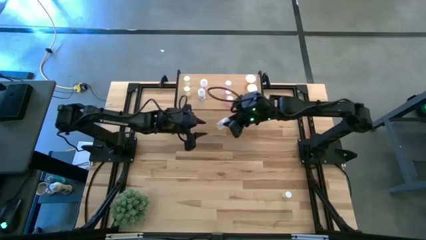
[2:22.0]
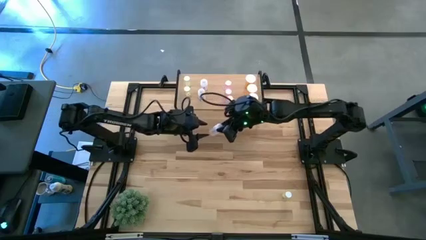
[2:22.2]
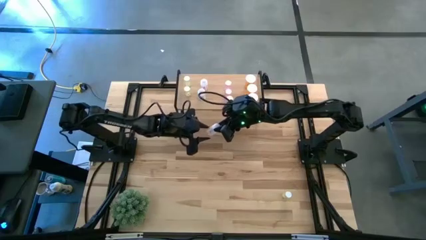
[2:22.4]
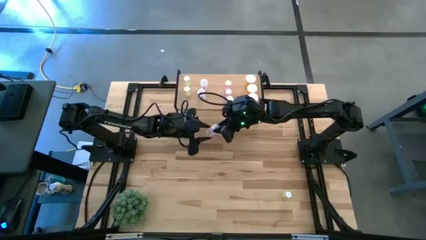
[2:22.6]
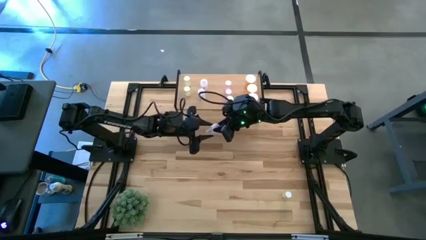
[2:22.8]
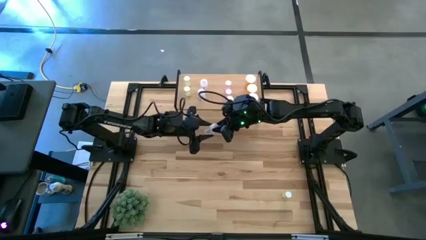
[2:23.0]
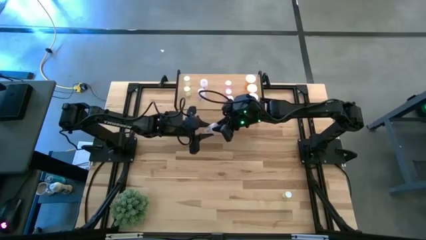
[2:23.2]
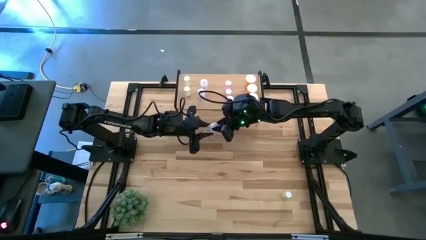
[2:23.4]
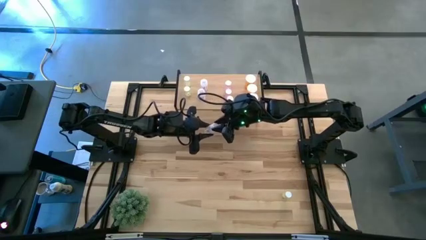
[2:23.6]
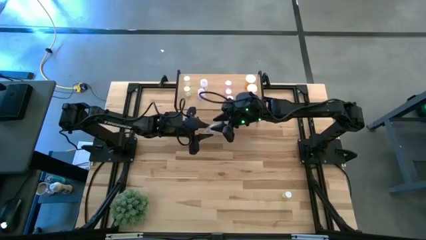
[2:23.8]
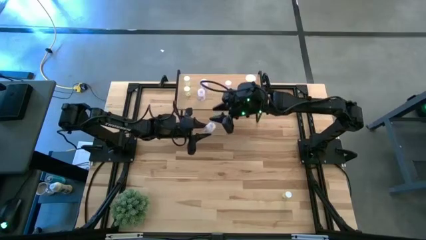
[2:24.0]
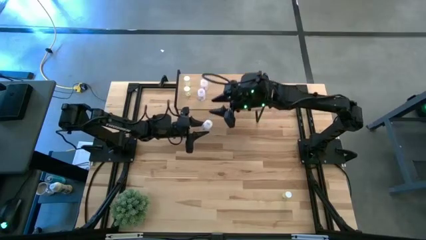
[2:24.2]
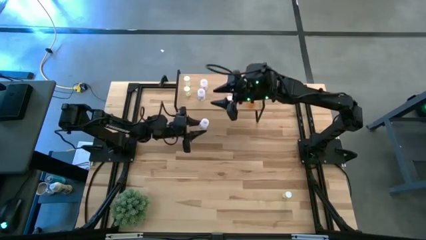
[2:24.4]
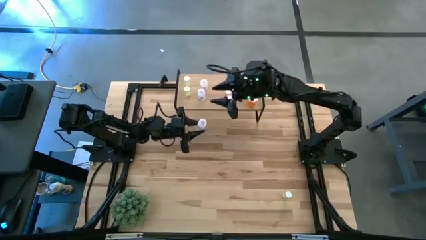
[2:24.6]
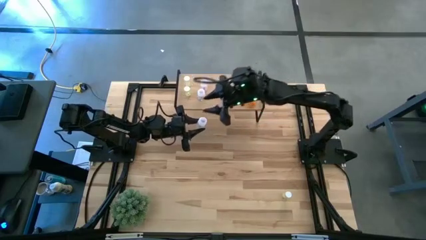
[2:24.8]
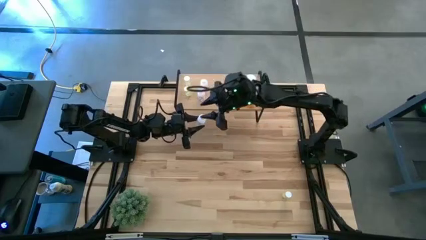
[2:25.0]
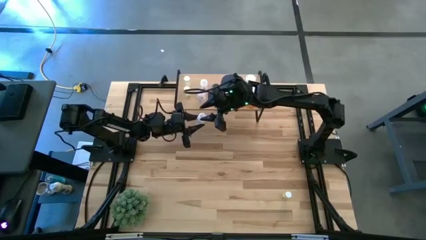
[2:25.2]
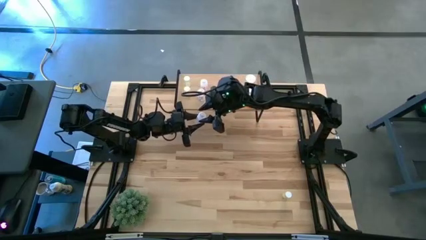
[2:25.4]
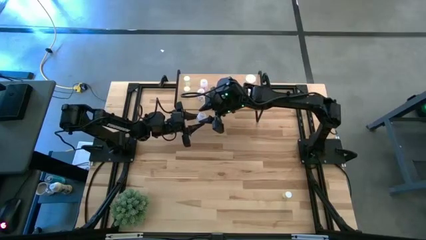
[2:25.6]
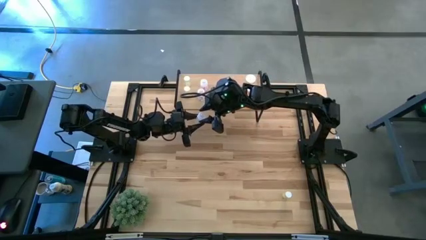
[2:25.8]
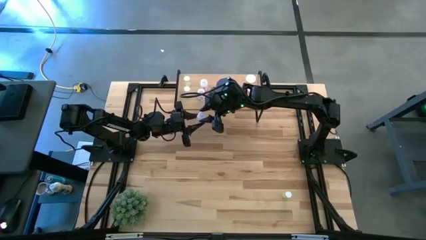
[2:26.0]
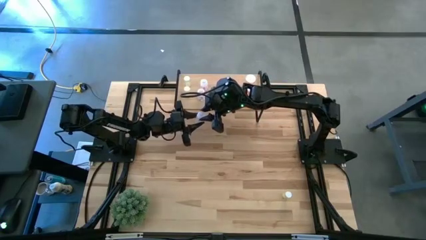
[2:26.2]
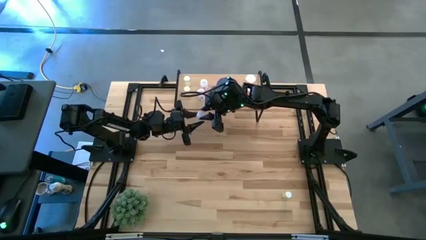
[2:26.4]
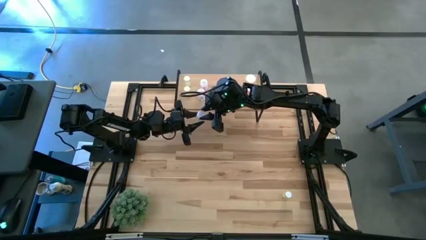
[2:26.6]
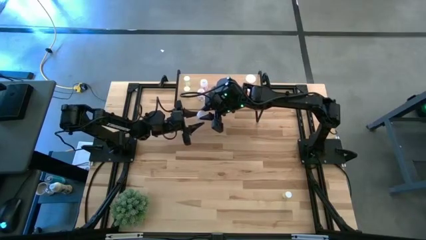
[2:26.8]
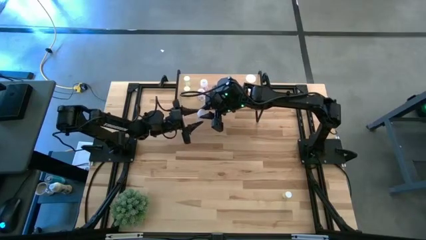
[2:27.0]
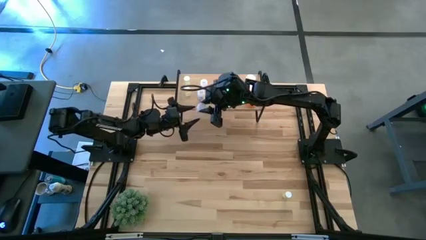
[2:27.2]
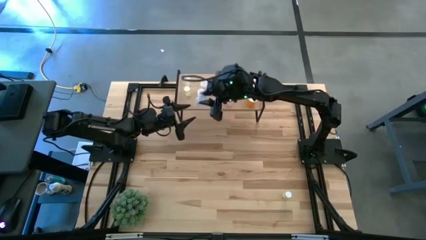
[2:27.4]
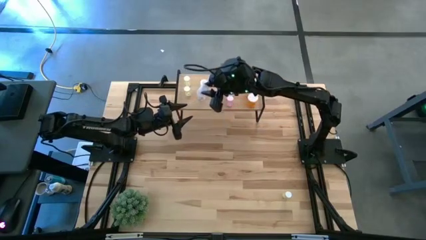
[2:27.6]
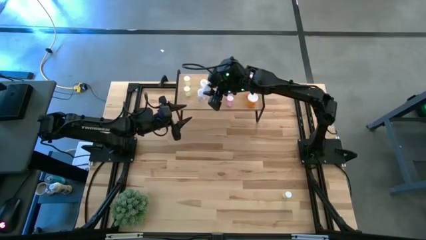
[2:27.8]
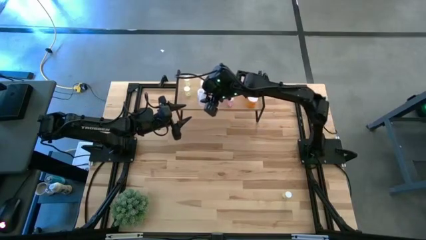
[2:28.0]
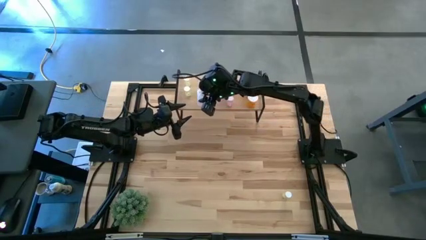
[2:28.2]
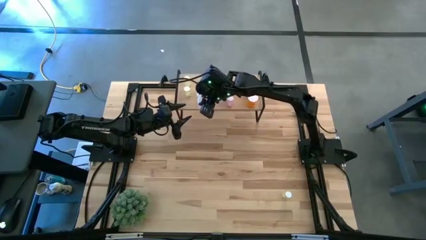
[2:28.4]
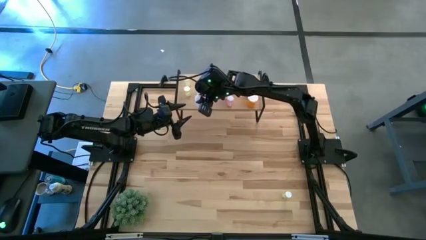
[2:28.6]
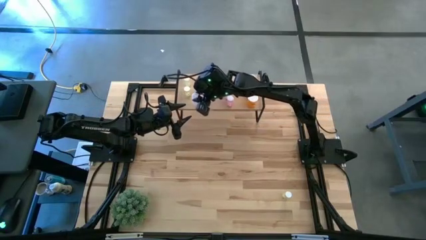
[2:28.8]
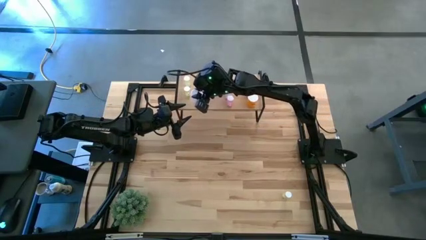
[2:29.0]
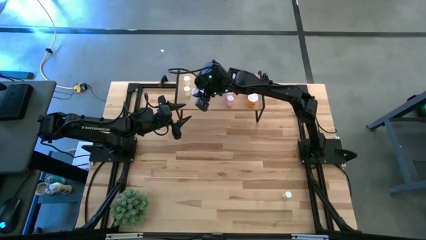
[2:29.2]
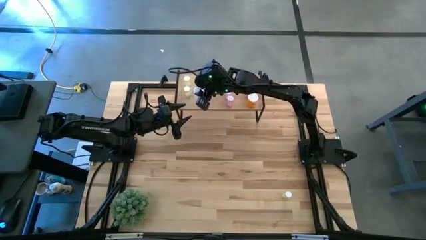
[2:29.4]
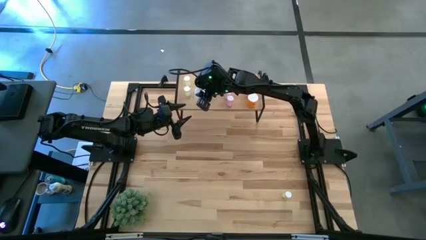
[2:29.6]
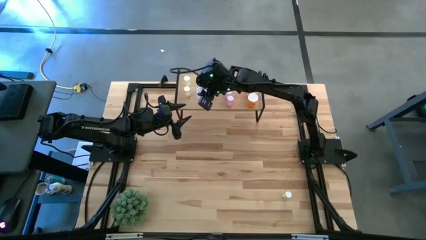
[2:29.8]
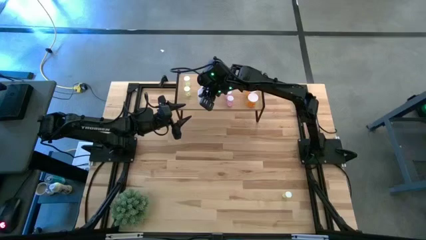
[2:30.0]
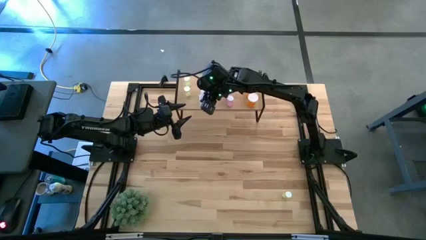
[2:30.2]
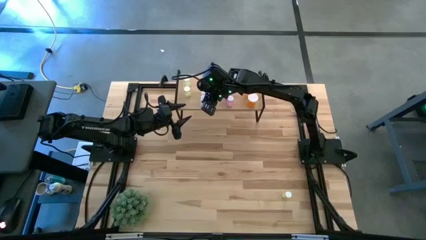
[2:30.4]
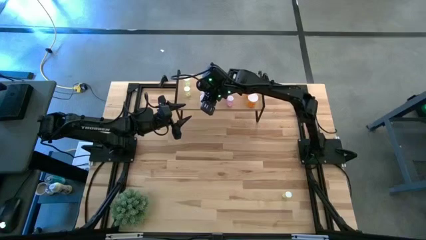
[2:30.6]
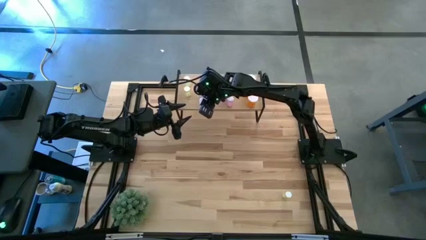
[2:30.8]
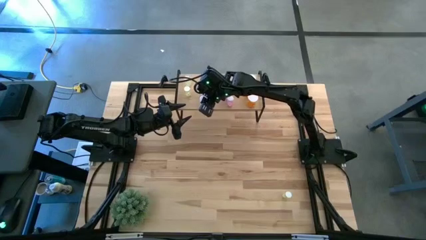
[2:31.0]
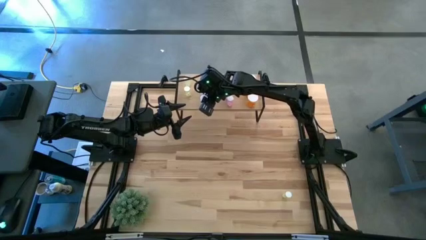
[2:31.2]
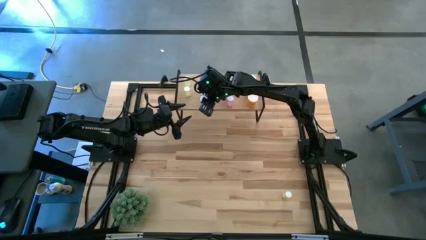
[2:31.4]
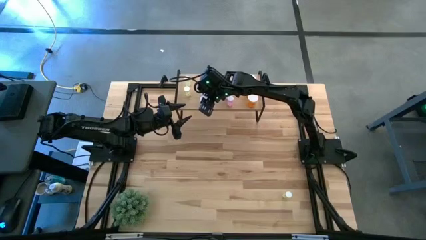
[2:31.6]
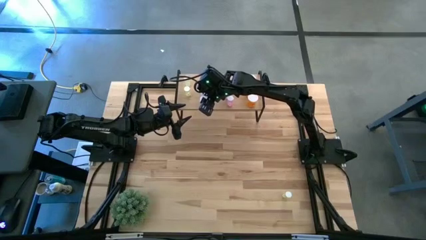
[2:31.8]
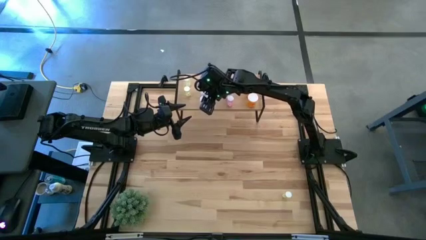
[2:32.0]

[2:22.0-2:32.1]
Task: Pick and place medicine bottles onto shelf by color
Put the white pill bottle aligned with the other white pill bottles on the shelf

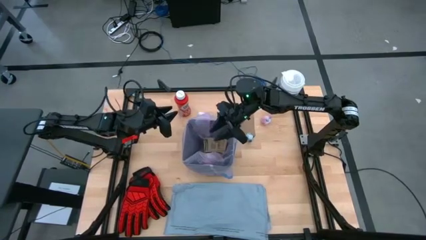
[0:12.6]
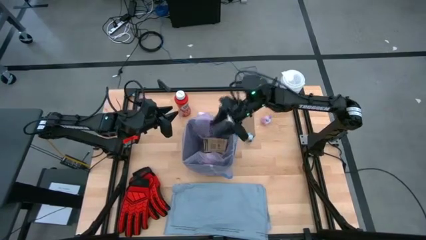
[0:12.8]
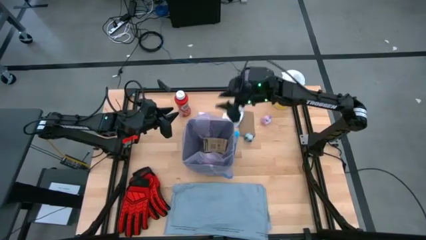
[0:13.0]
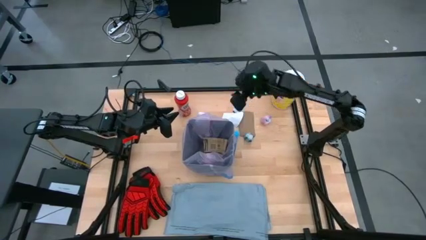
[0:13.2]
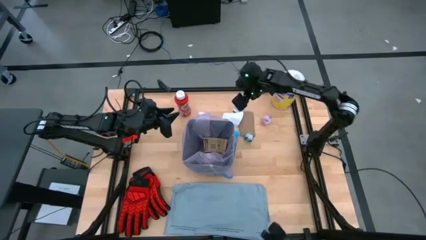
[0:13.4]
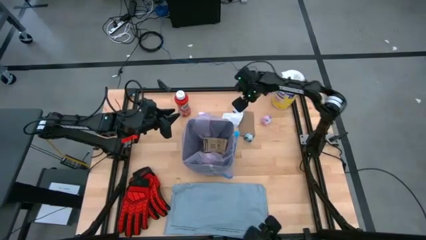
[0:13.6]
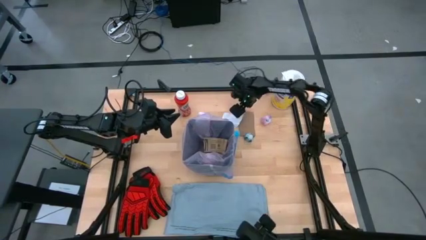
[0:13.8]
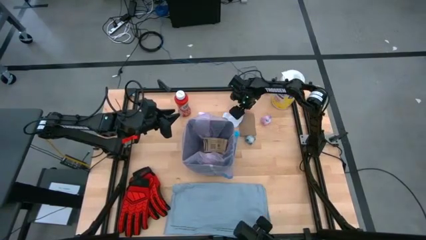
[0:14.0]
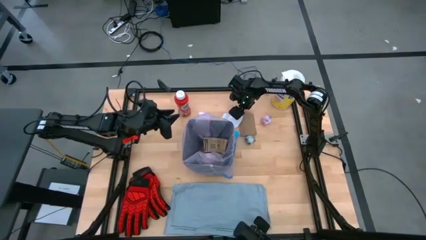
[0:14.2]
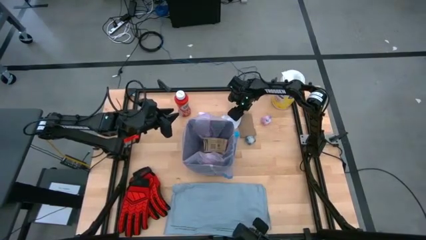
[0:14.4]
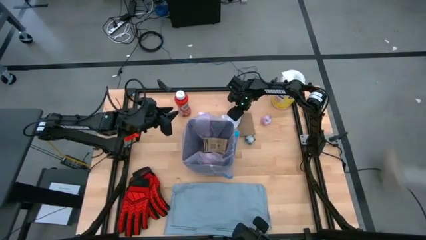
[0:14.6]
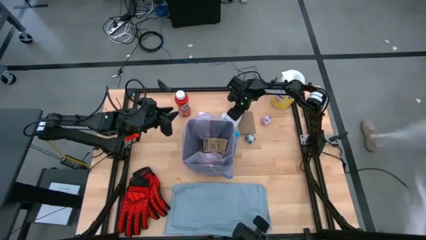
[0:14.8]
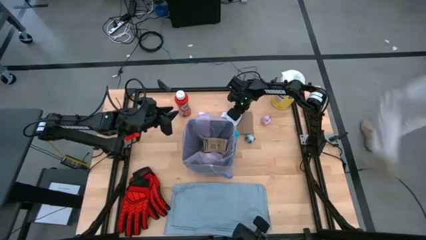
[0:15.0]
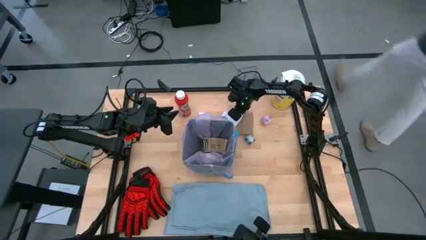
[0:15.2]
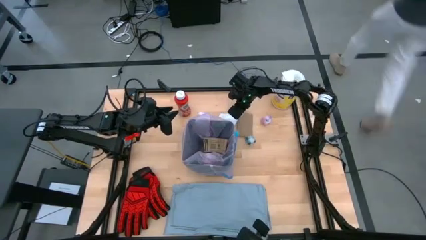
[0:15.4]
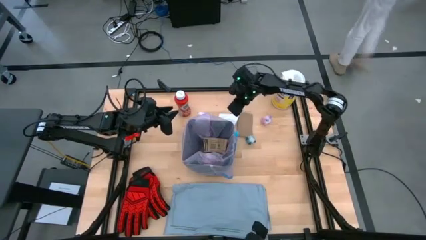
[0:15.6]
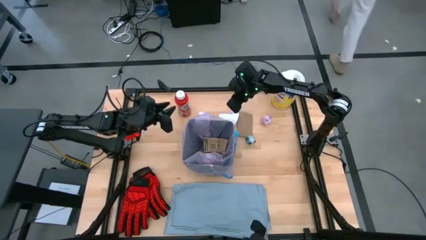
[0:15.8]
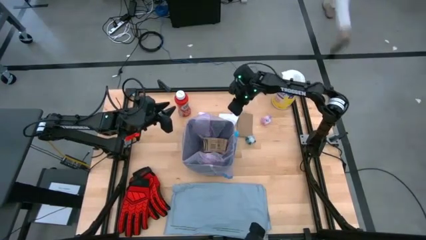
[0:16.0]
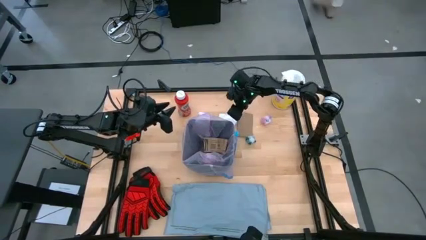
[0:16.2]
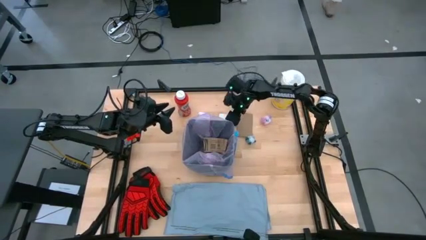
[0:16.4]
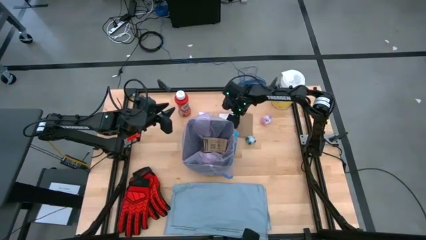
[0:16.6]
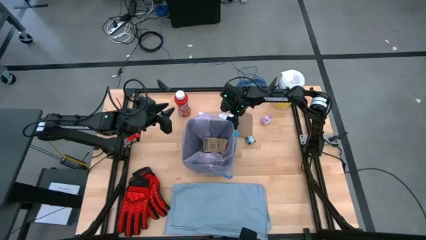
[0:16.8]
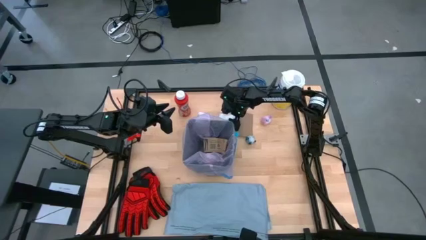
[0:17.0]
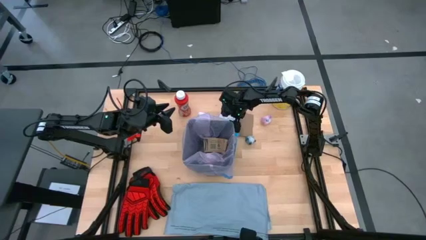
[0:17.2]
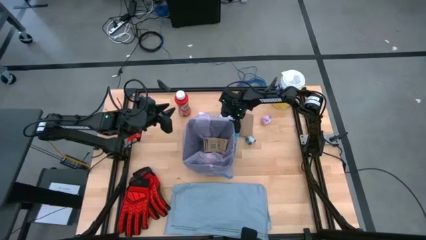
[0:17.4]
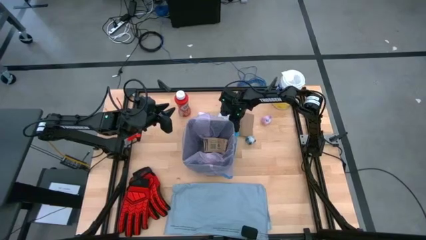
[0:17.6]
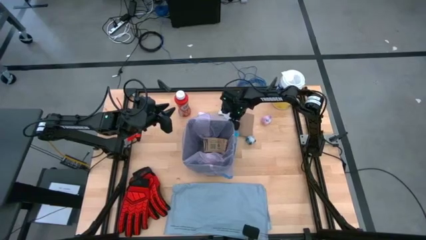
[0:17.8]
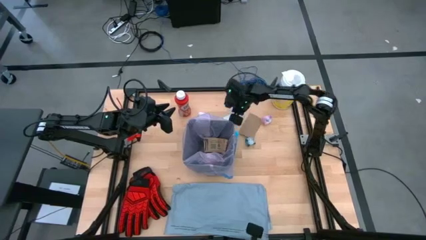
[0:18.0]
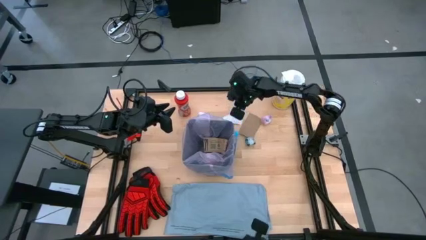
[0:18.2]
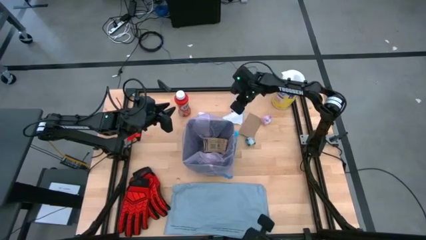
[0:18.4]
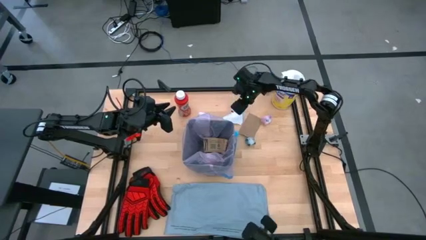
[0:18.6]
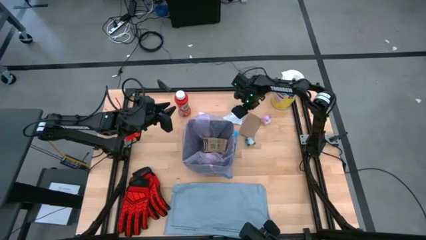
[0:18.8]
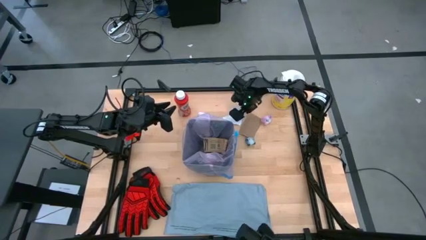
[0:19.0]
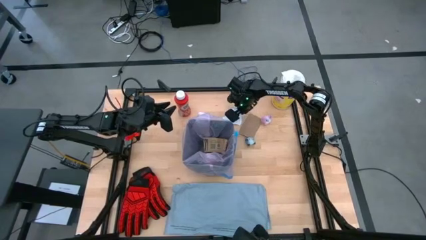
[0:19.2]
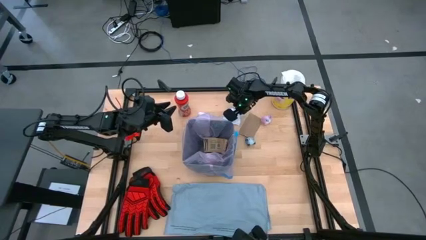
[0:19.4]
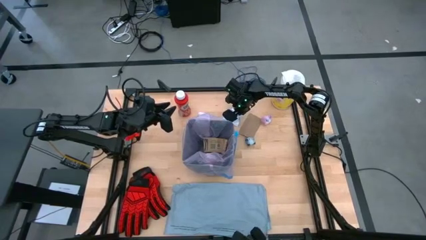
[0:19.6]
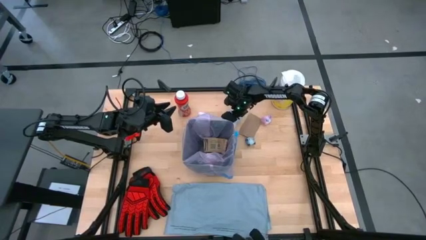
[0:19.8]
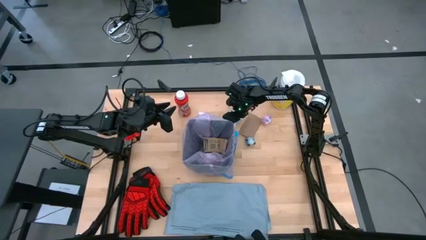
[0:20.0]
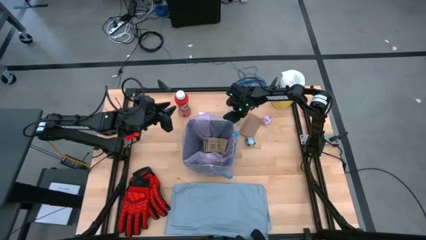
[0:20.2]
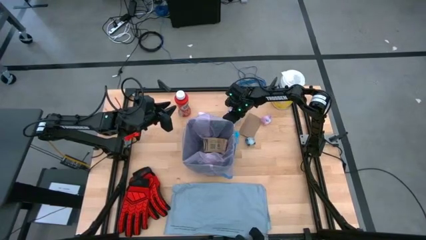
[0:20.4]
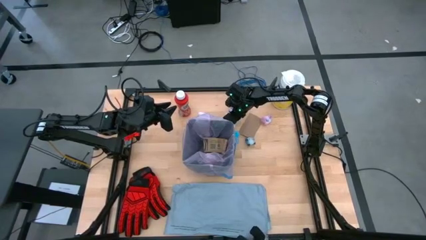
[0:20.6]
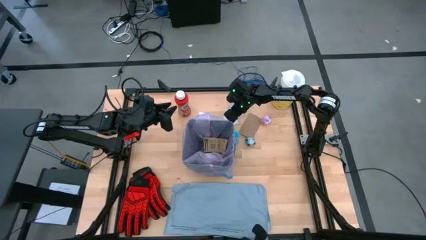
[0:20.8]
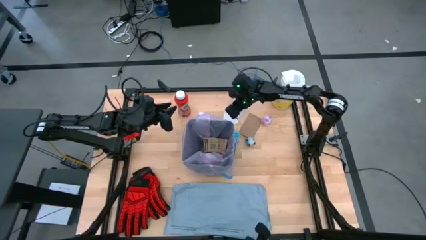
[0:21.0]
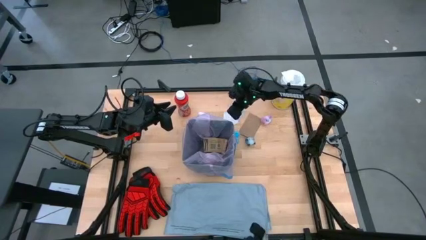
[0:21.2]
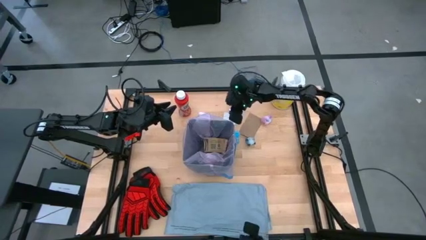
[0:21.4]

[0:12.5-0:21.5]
Task: place trash/remove bag and relplace
Put the white paper material into the trash bin
